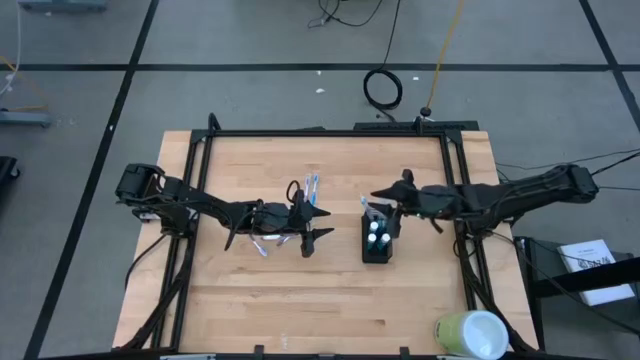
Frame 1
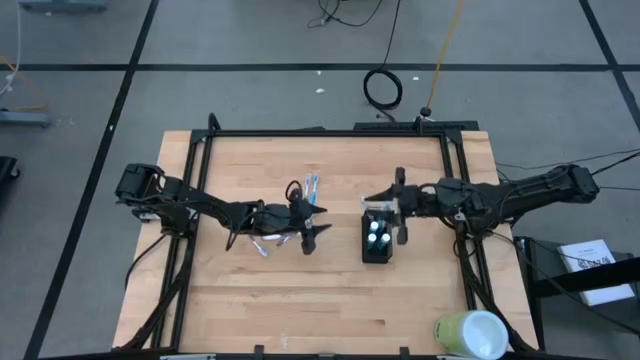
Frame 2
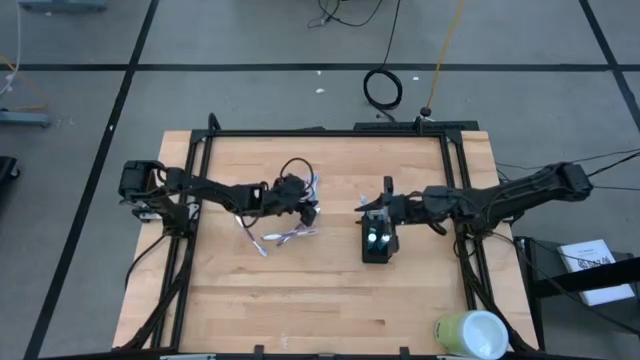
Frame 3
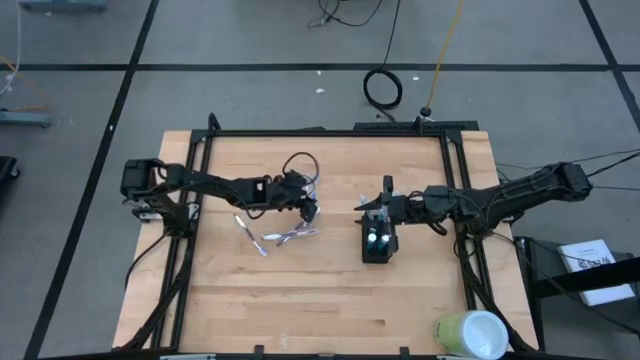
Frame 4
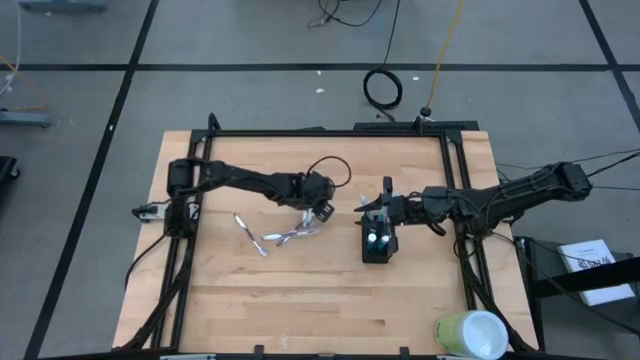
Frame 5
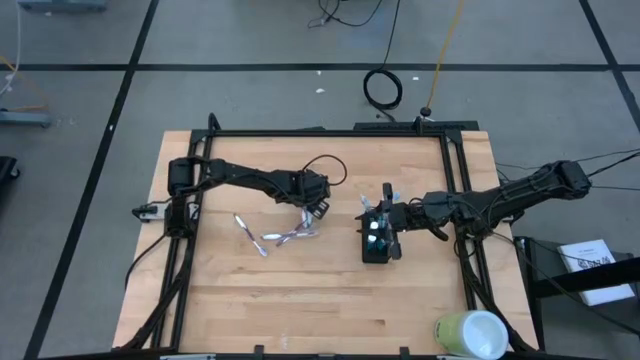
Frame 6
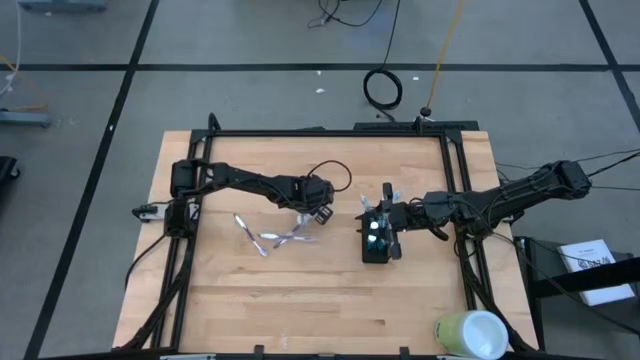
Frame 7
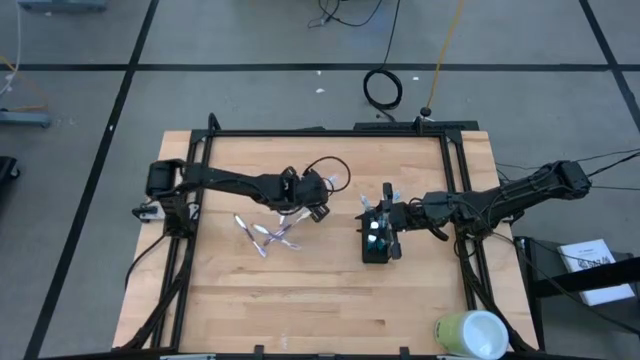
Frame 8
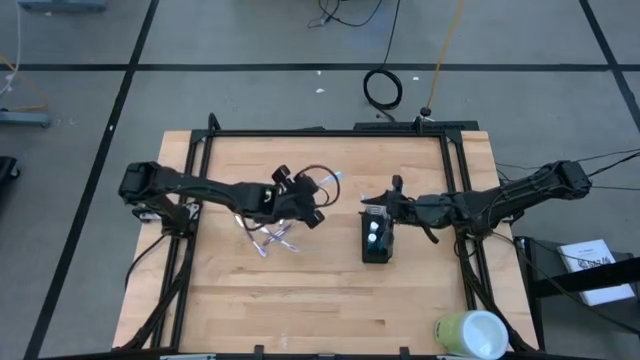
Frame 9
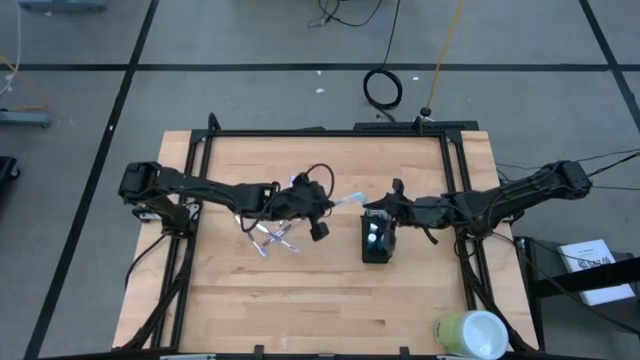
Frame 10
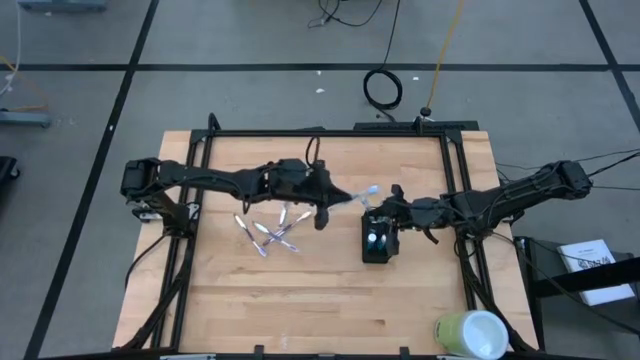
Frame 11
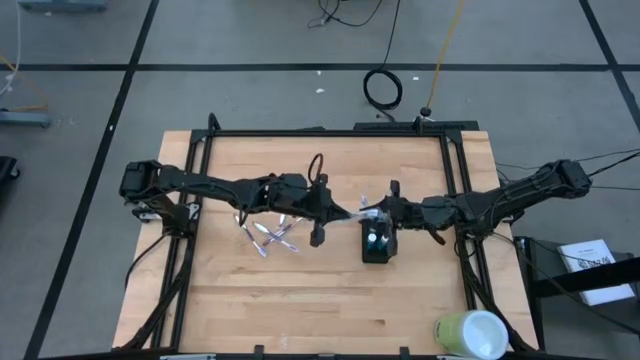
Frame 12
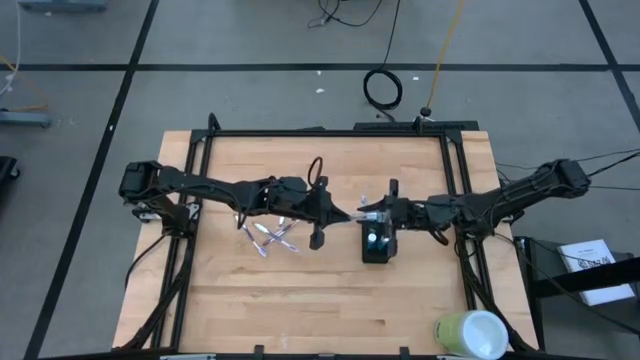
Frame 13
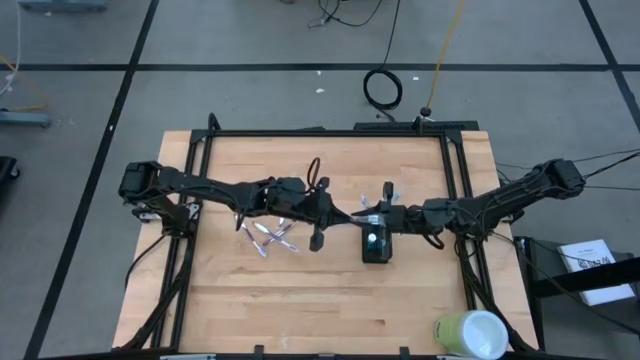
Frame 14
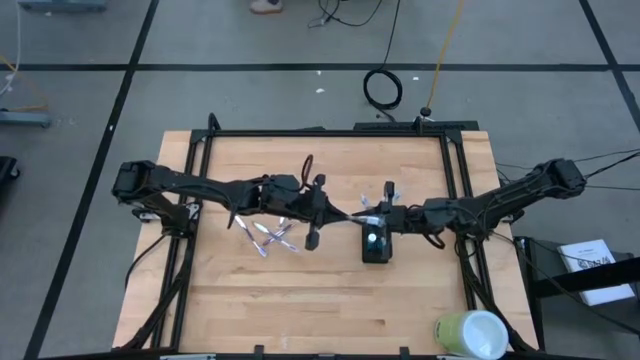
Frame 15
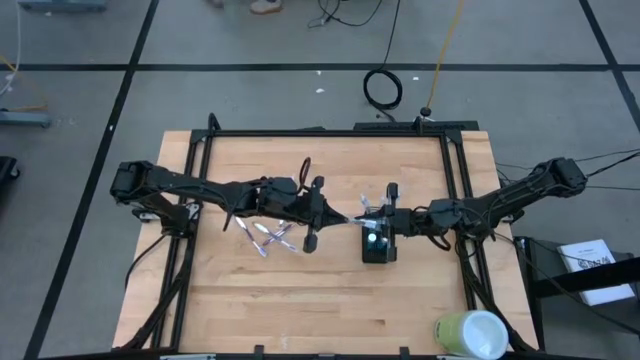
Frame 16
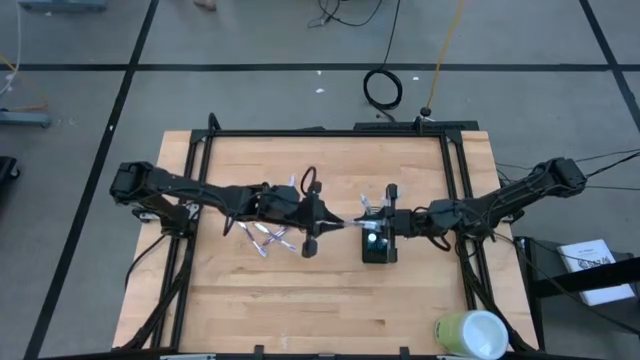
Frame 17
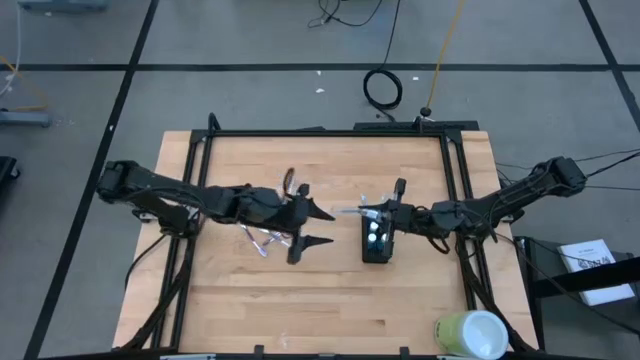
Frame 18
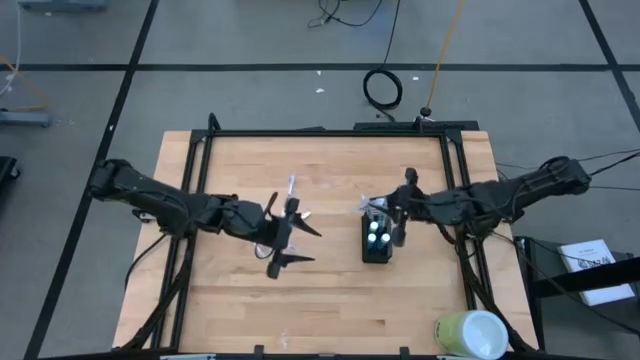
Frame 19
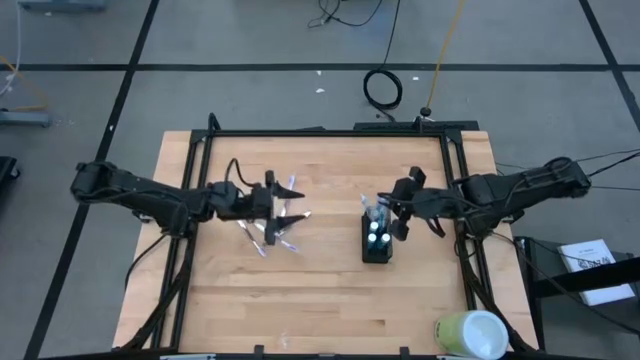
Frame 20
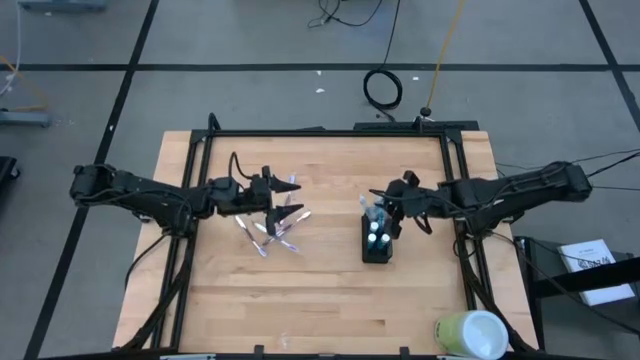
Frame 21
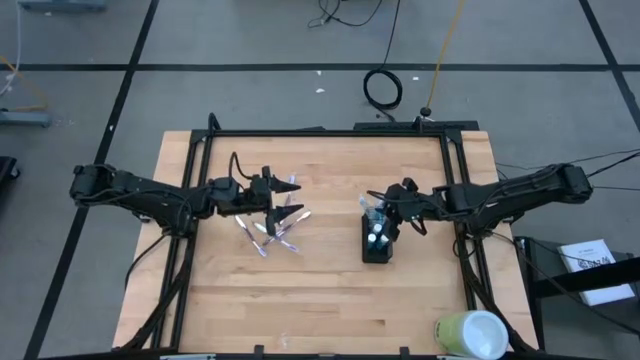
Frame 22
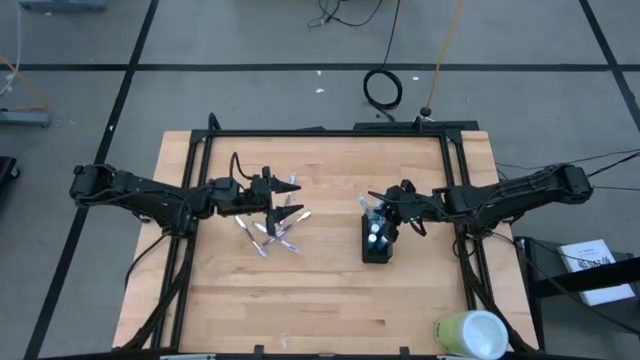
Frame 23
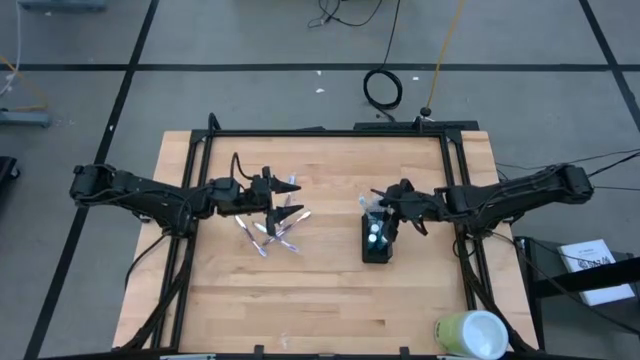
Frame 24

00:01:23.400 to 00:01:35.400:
Task: Pick & Place toothbrushing station
Put the blue toothbrush into the black organizer

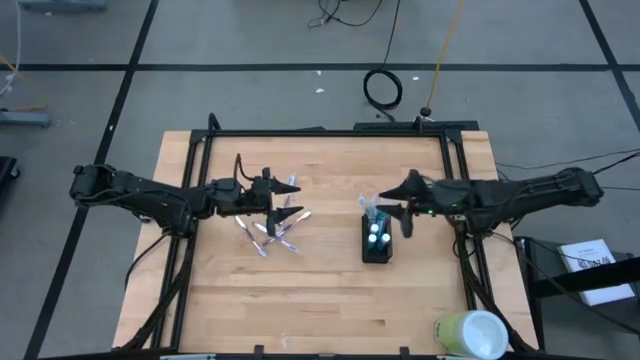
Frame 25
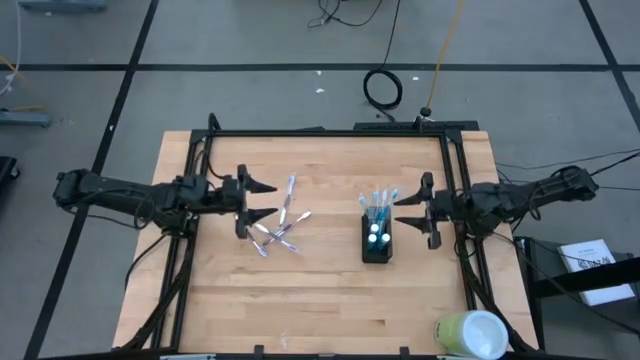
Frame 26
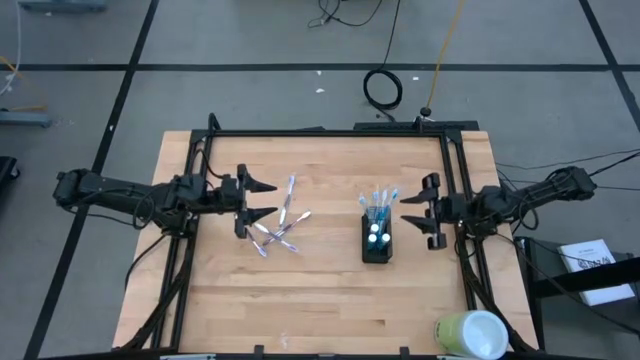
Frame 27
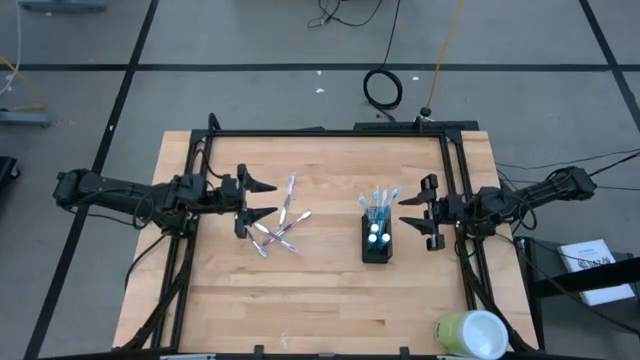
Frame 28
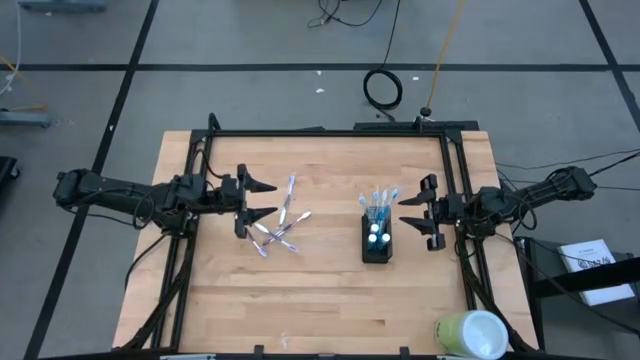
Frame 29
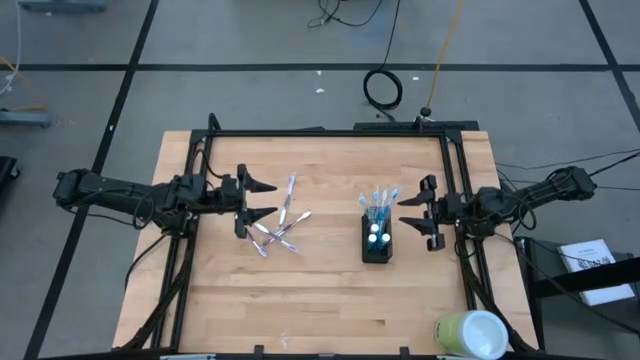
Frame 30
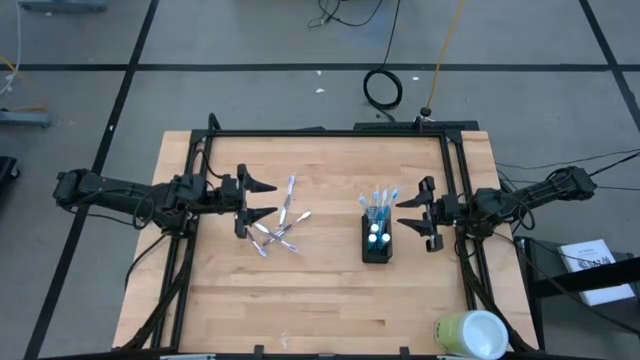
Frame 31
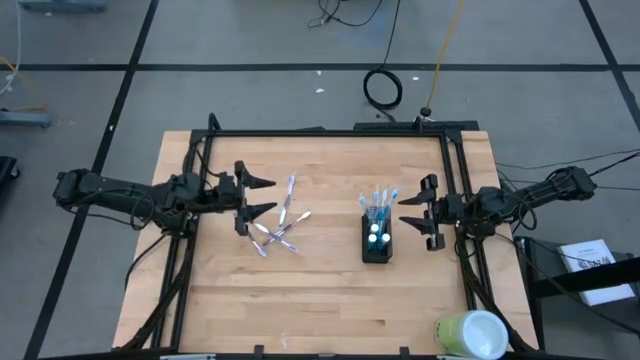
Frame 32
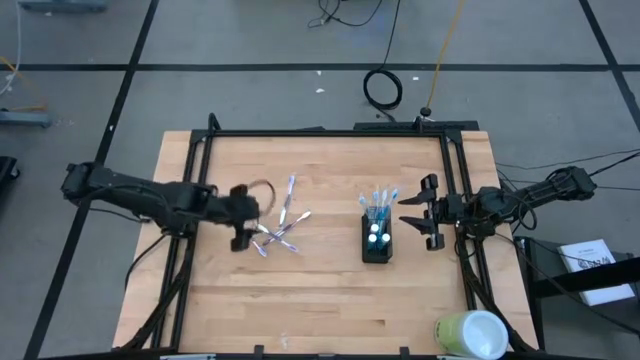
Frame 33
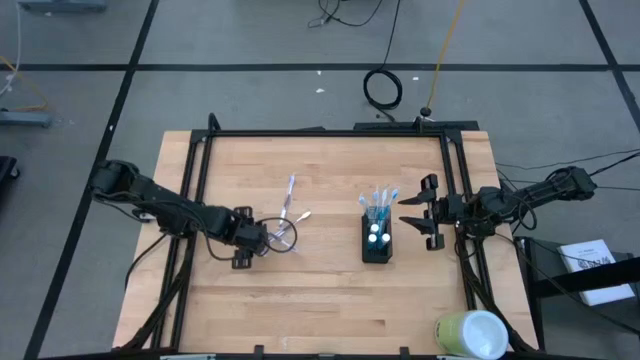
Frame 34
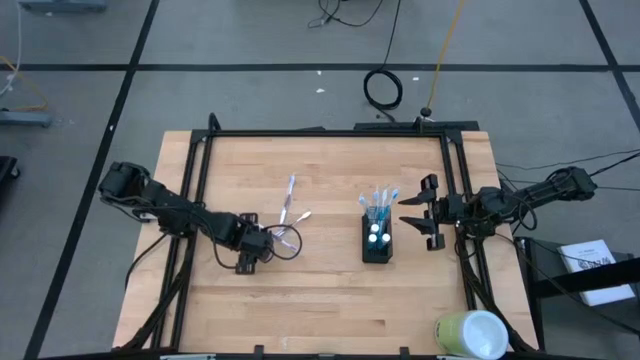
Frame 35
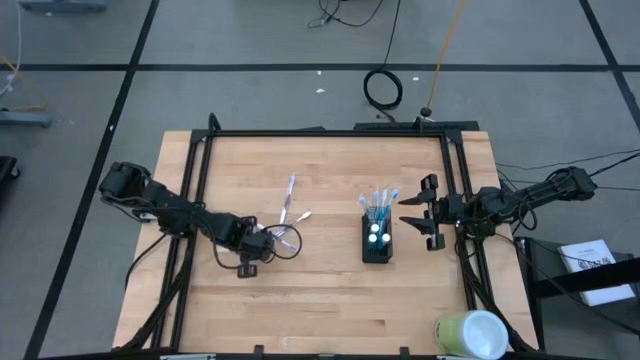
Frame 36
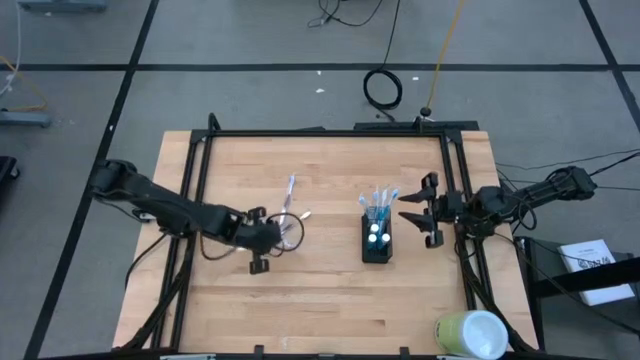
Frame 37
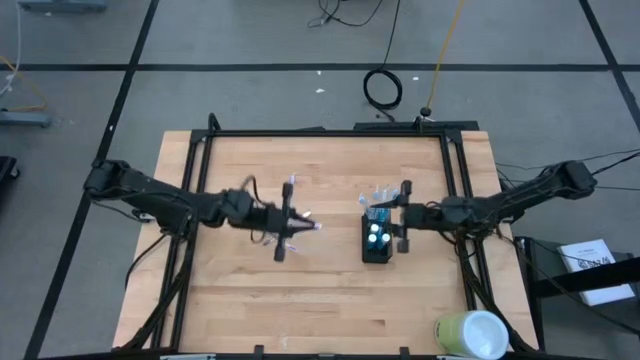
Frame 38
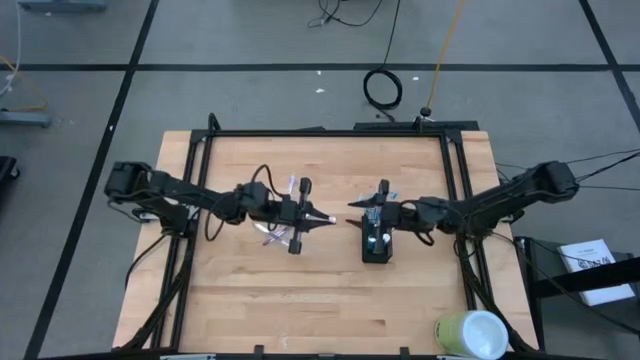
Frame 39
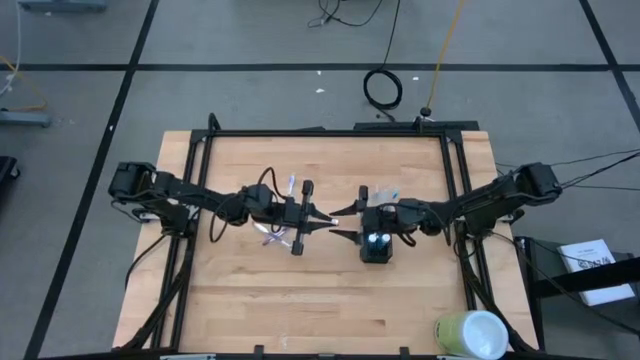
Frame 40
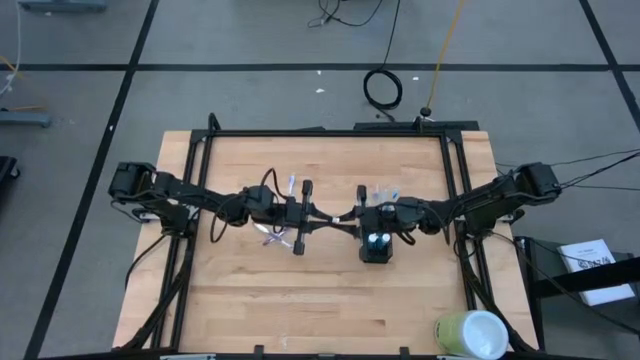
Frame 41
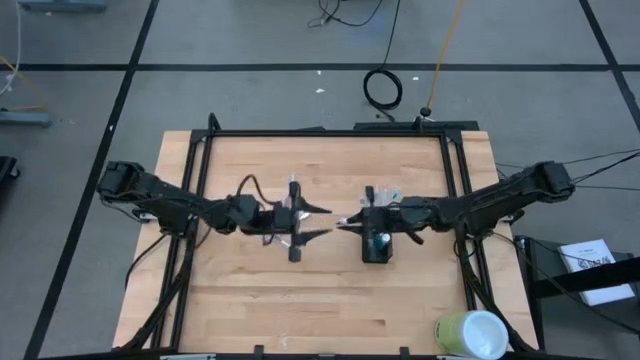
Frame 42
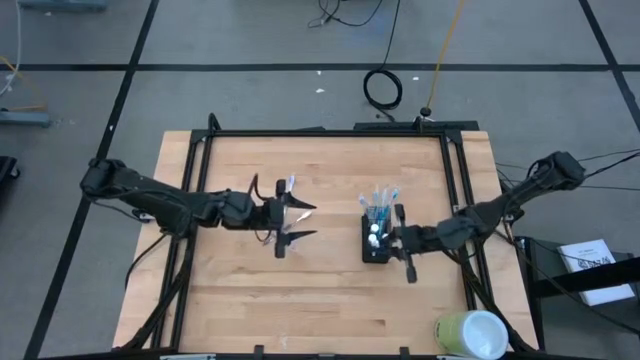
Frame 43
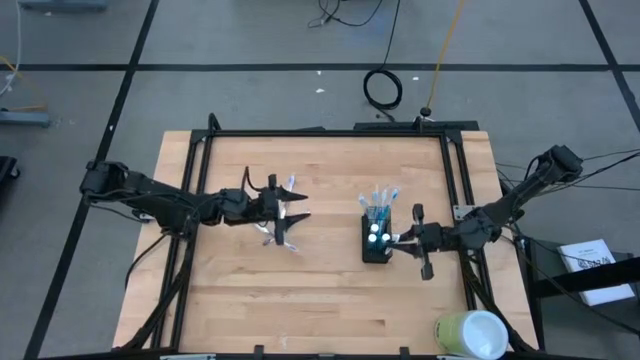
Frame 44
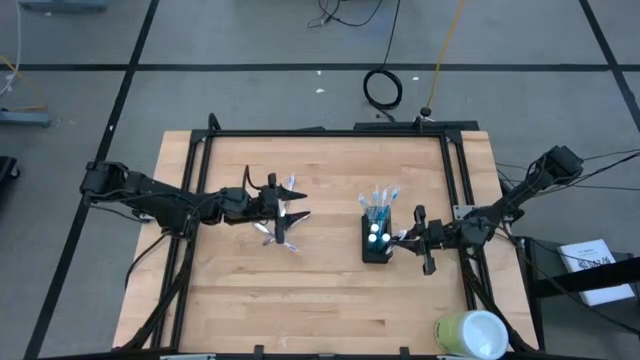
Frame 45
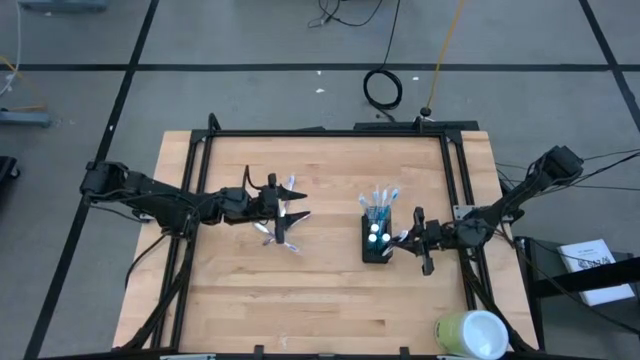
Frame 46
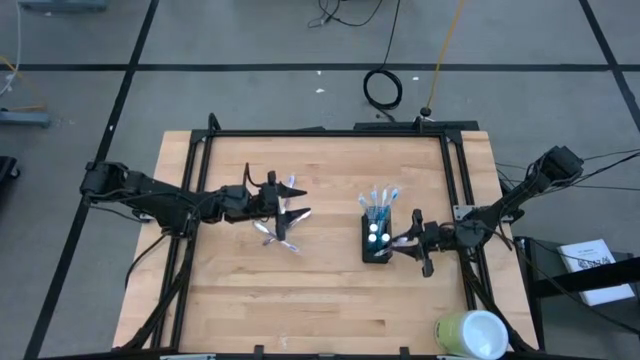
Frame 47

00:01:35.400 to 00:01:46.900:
Put the purple toothbrush into the black organizer
